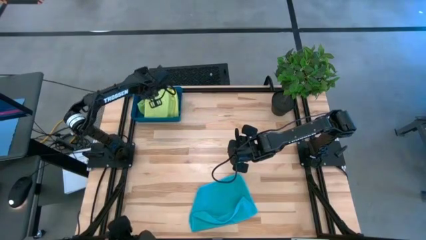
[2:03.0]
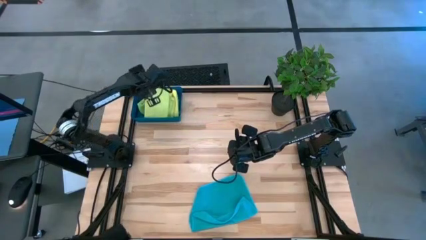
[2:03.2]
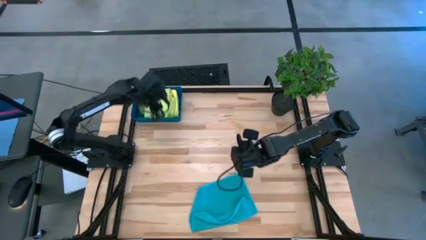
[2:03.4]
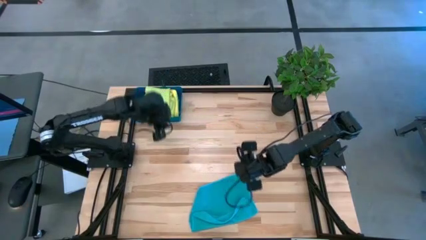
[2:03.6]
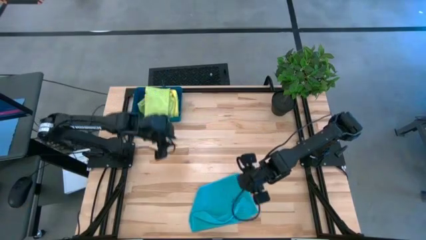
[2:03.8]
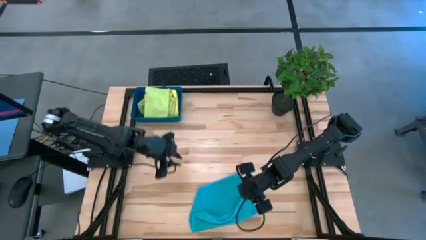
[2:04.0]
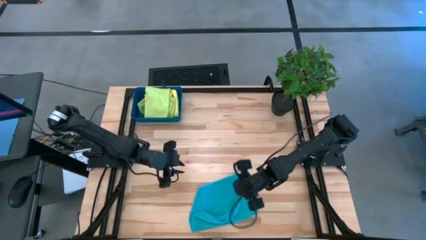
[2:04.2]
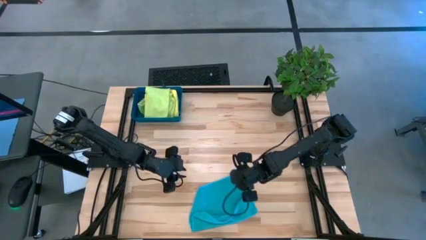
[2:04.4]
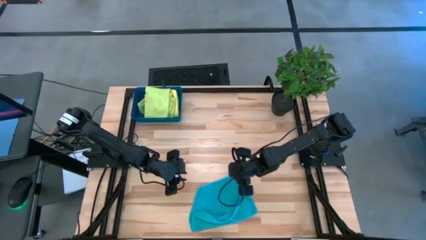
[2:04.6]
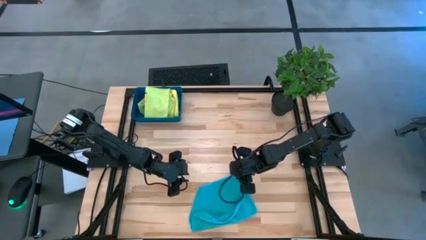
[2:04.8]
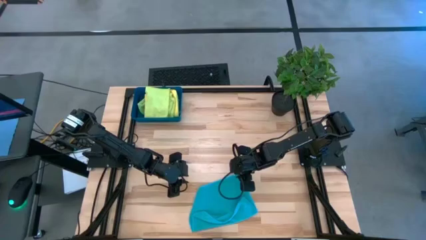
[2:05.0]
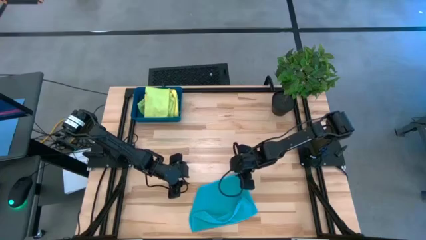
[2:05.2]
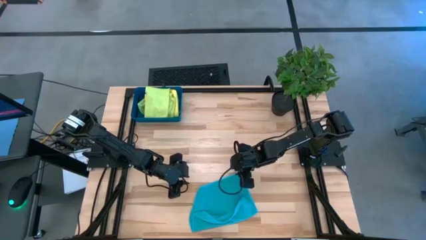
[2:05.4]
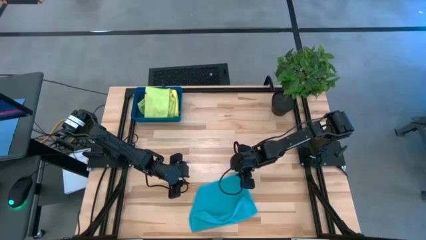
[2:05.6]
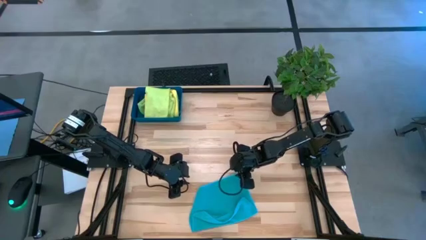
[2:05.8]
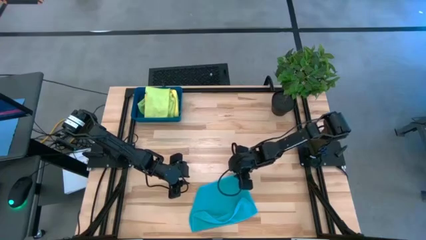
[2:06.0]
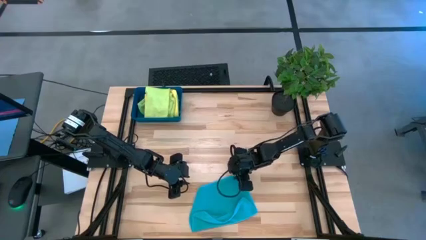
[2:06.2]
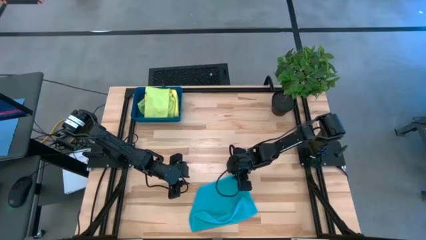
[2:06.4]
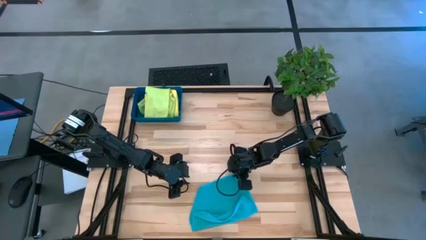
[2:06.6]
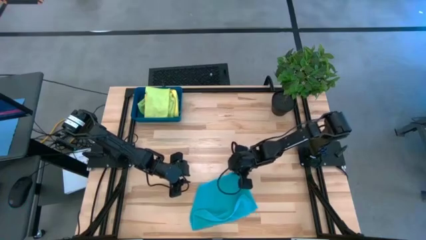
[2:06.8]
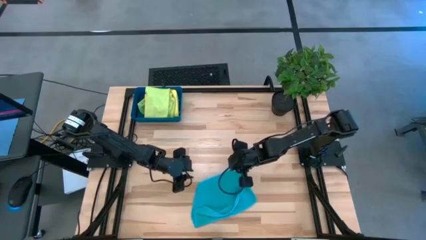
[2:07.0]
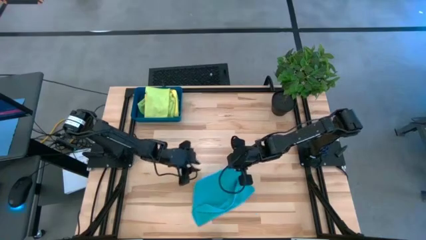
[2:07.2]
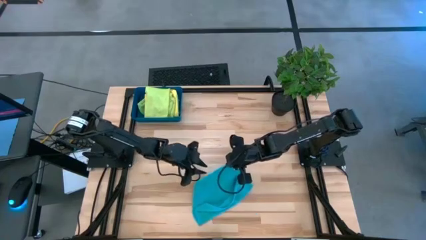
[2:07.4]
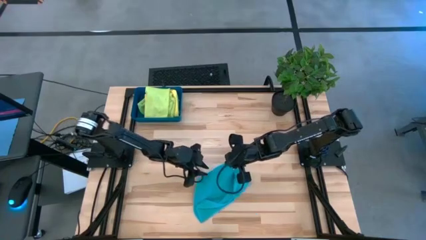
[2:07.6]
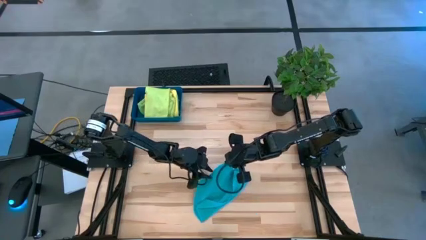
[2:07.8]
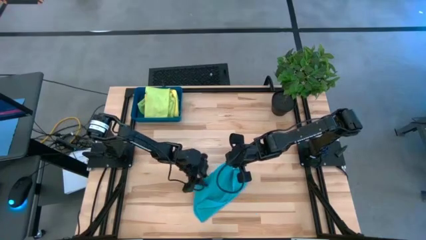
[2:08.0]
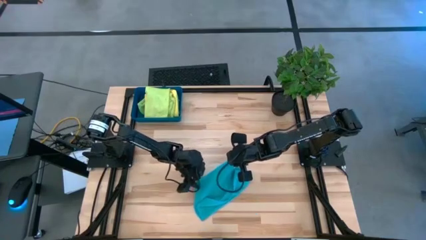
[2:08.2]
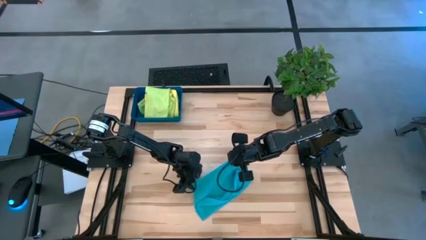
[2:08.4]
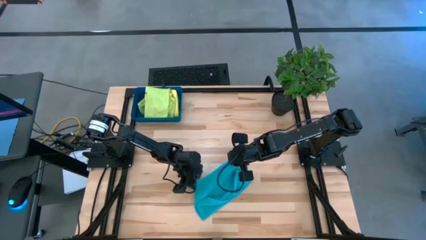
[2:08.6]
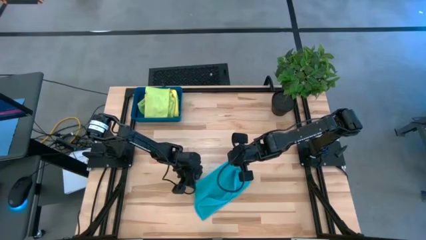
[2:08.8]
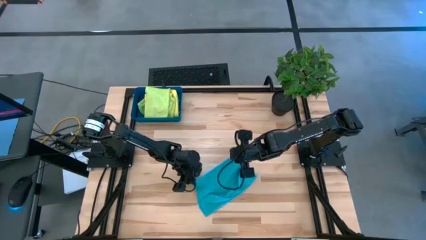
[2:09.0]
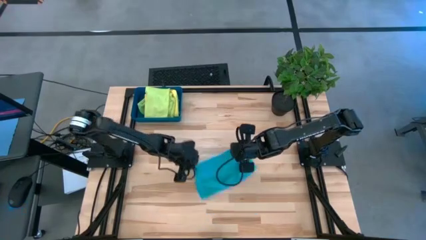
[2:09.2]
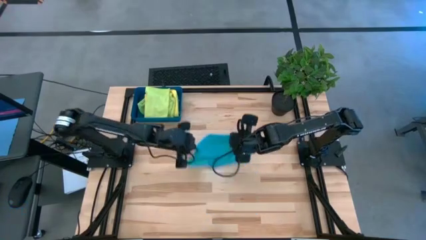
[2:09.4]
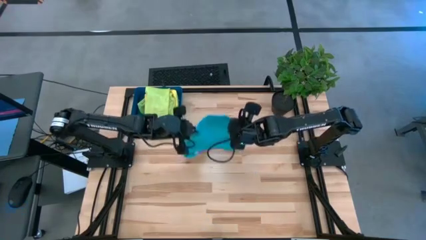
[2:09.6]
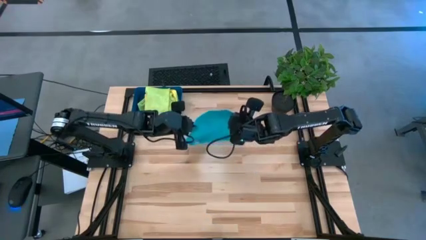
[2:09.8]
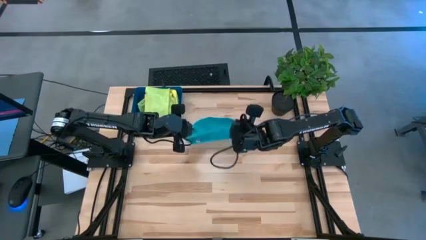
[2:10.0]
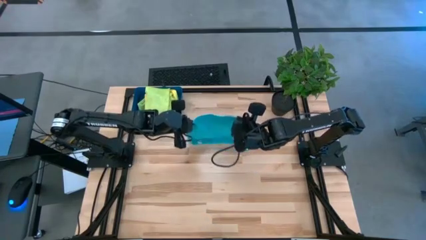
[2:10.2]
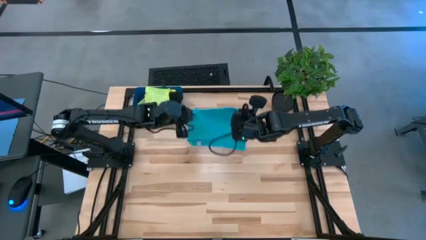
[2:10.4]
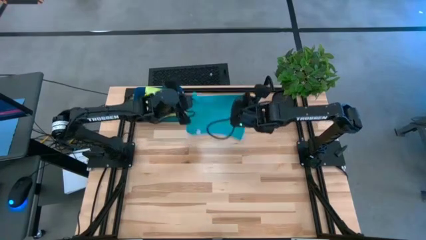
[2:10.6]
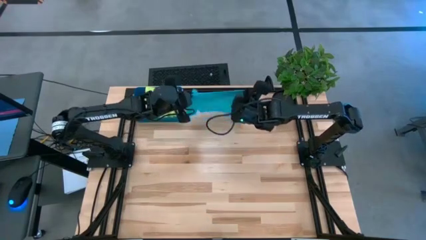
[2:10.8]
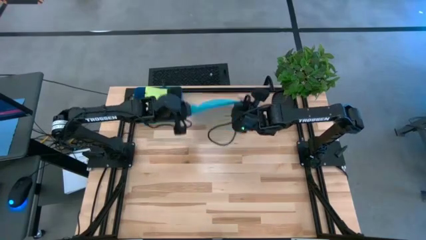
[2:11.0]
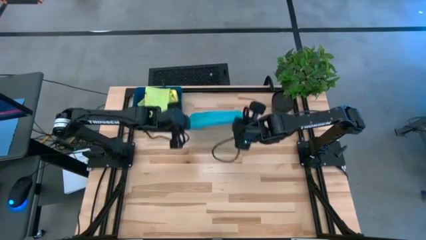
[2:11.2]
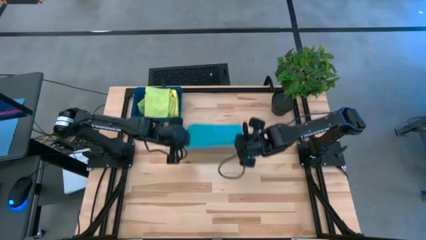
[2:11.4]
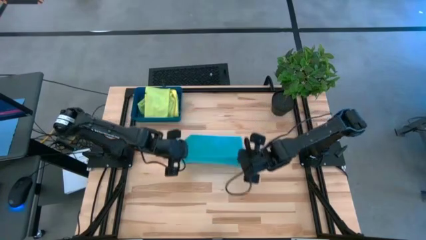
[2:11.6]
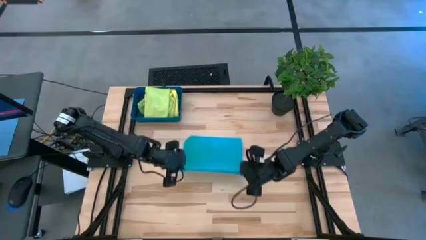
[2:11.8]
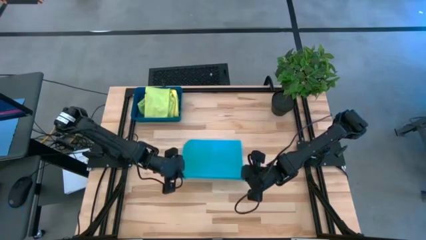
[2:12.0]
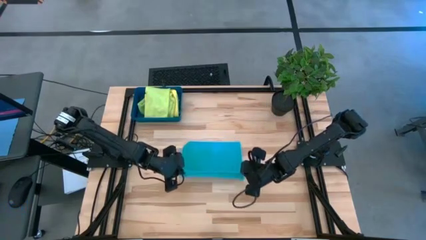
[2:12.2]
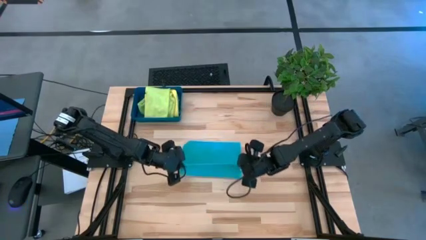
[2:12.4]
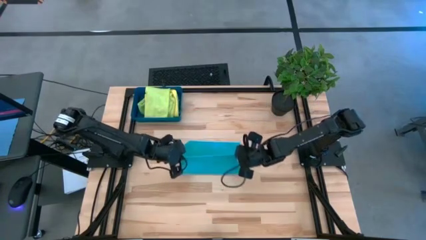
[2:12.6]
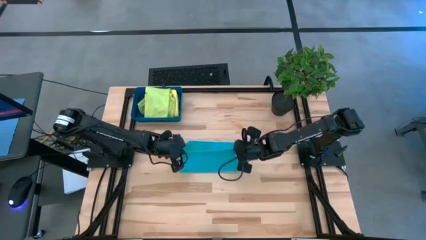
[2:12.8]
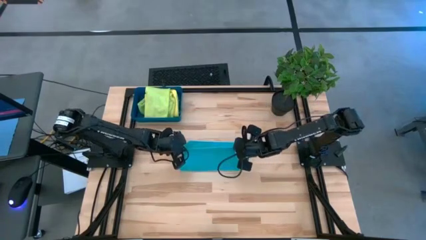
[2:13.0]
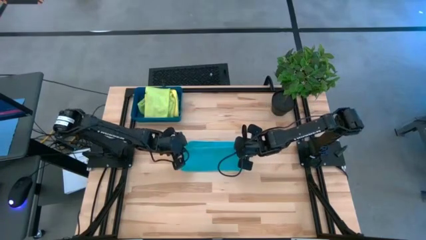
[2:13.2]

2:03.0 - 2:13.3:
Task: Fold microfiber towels
Fold the blue towel
